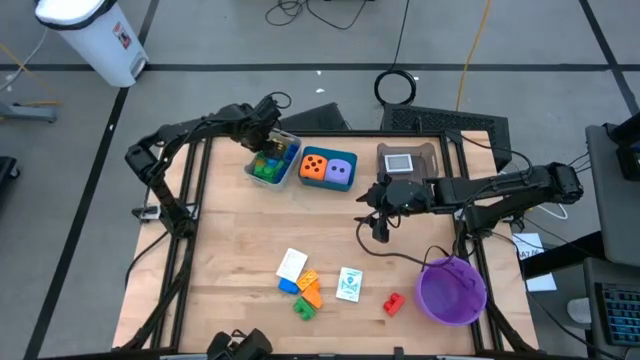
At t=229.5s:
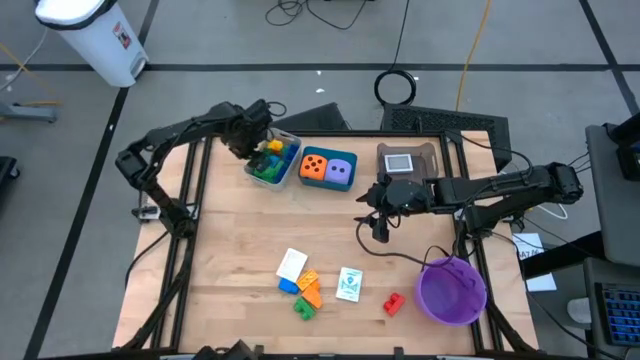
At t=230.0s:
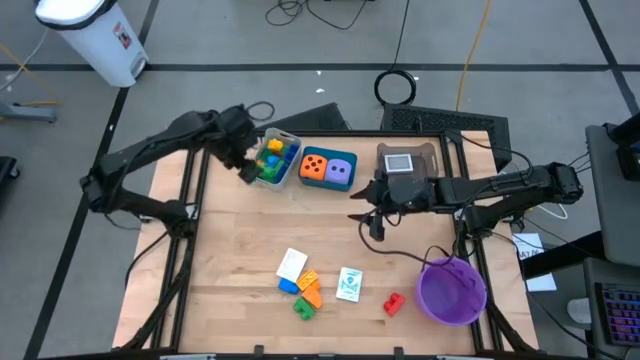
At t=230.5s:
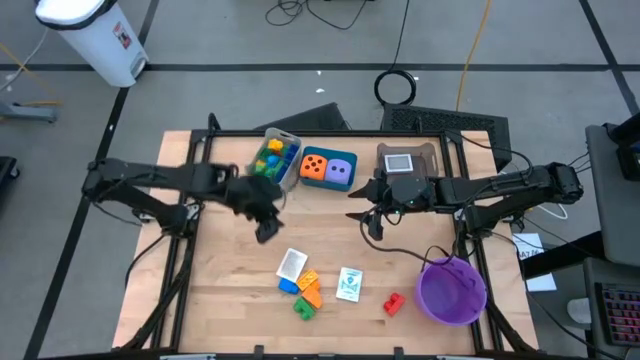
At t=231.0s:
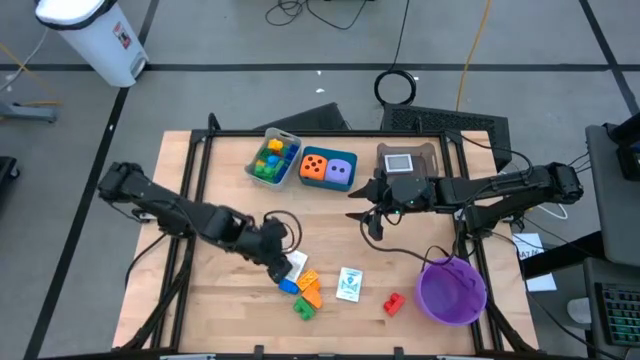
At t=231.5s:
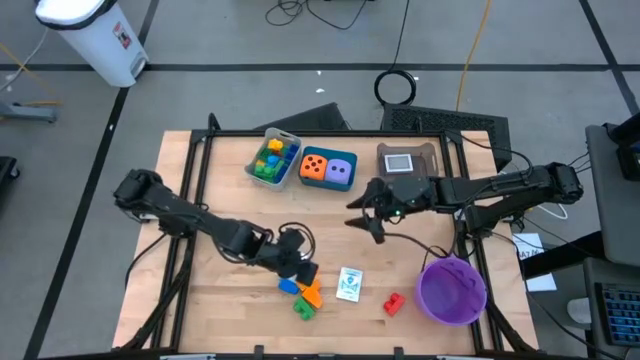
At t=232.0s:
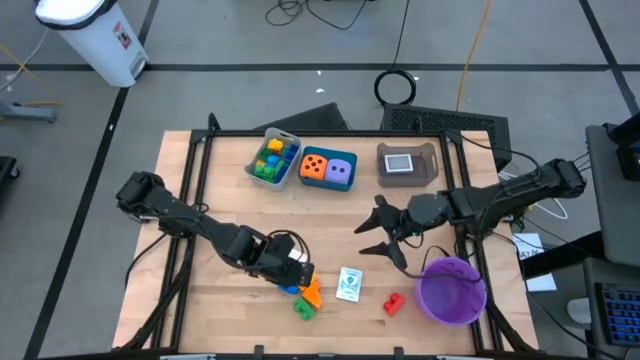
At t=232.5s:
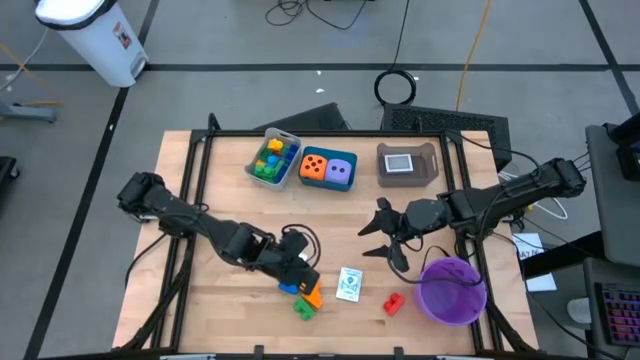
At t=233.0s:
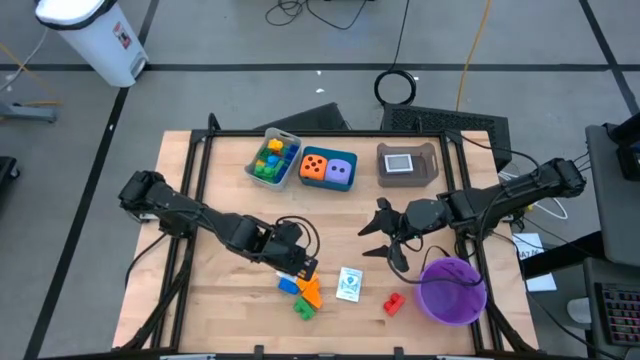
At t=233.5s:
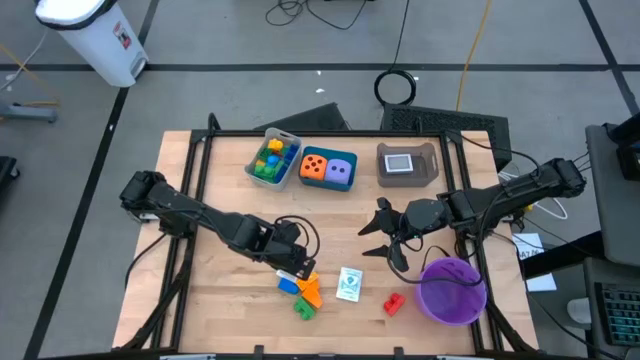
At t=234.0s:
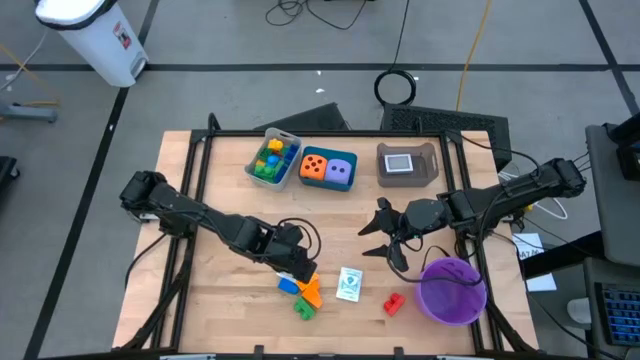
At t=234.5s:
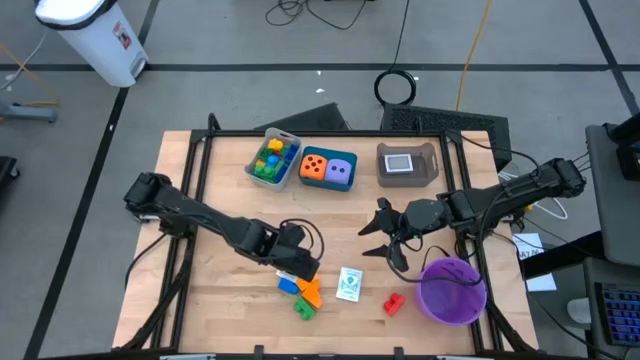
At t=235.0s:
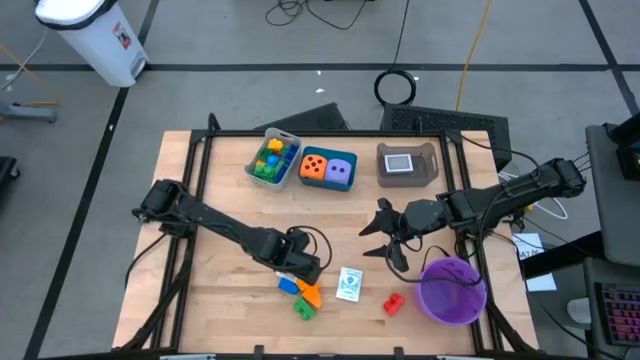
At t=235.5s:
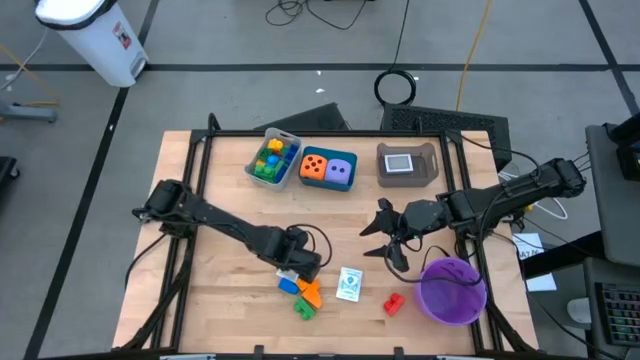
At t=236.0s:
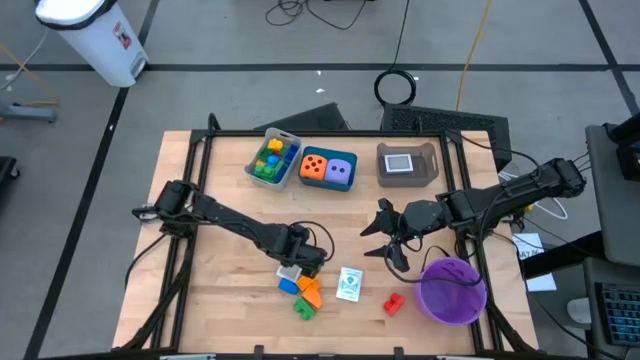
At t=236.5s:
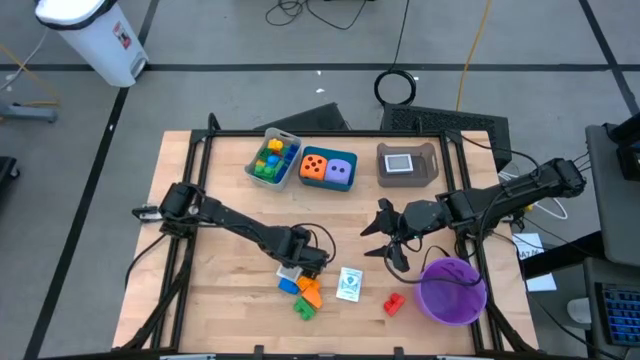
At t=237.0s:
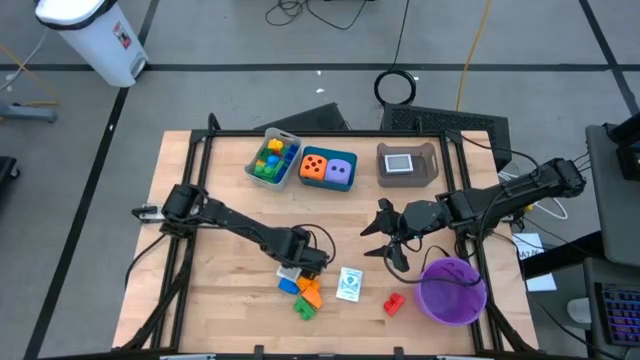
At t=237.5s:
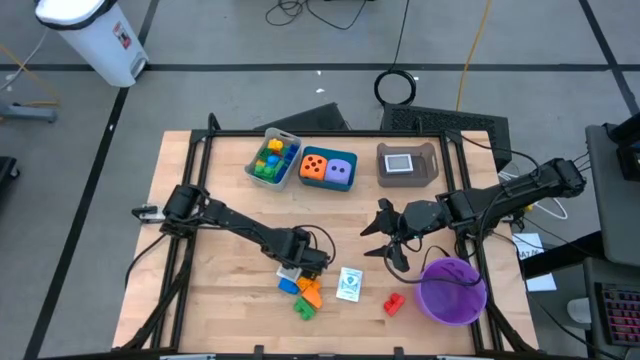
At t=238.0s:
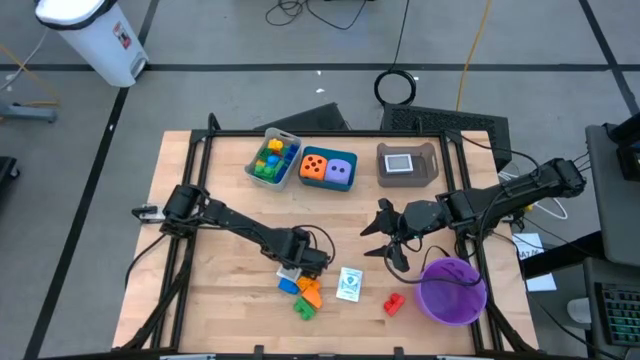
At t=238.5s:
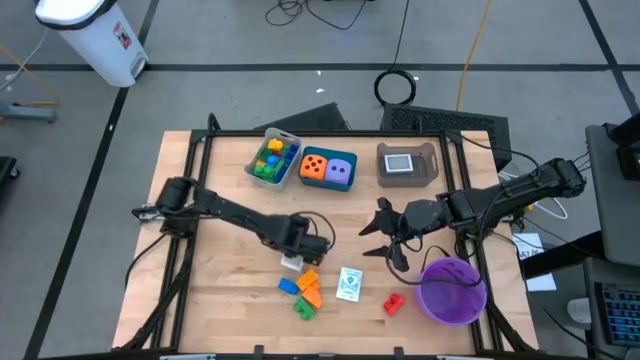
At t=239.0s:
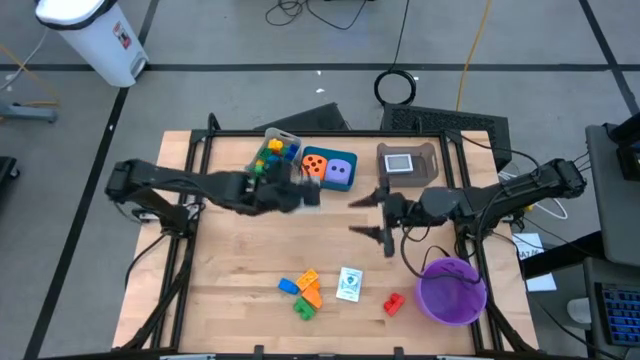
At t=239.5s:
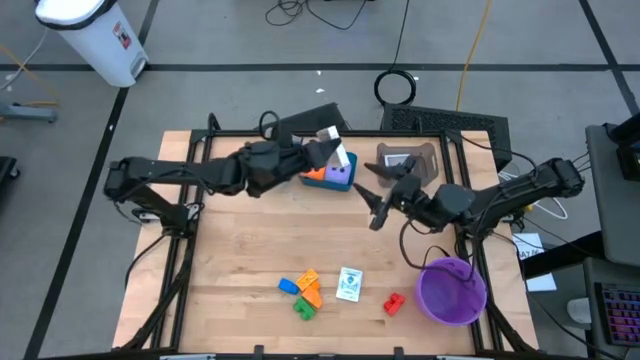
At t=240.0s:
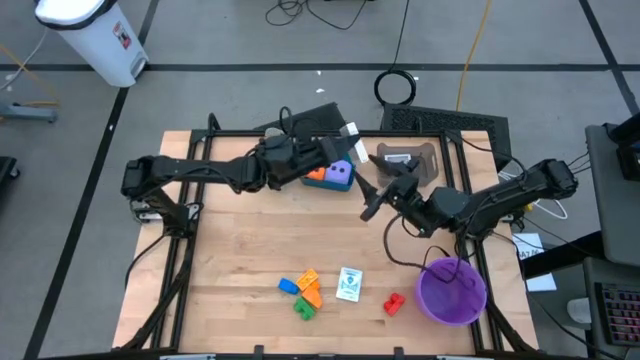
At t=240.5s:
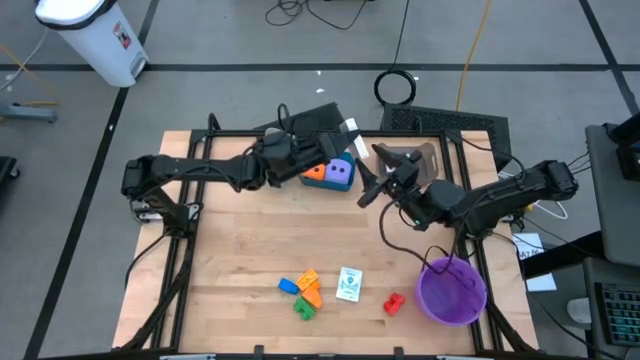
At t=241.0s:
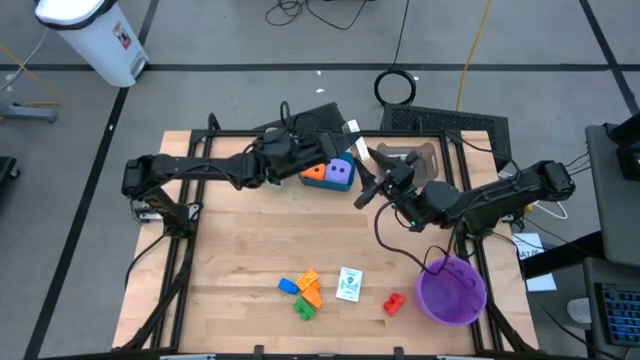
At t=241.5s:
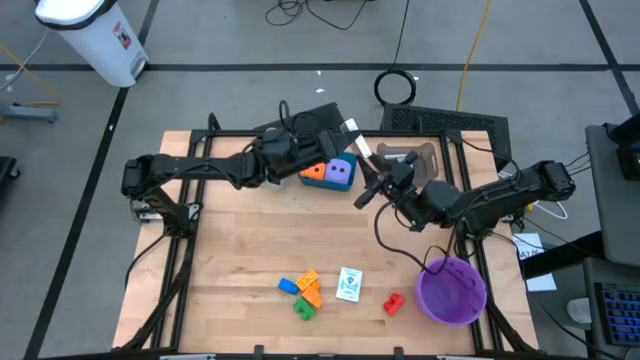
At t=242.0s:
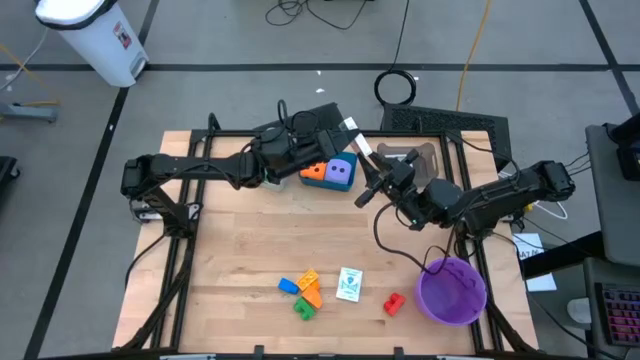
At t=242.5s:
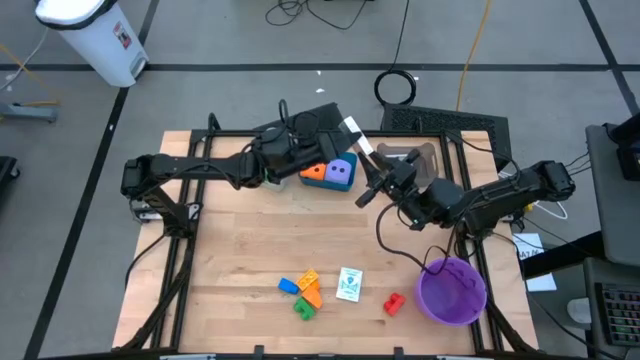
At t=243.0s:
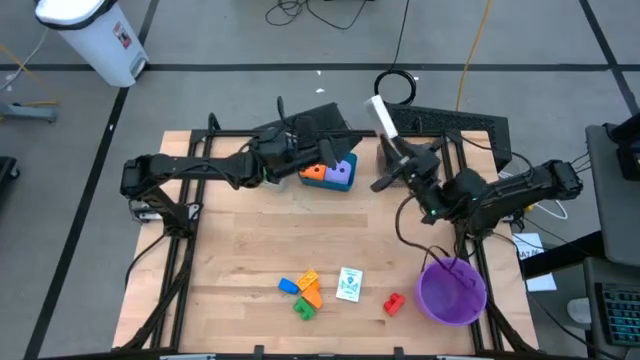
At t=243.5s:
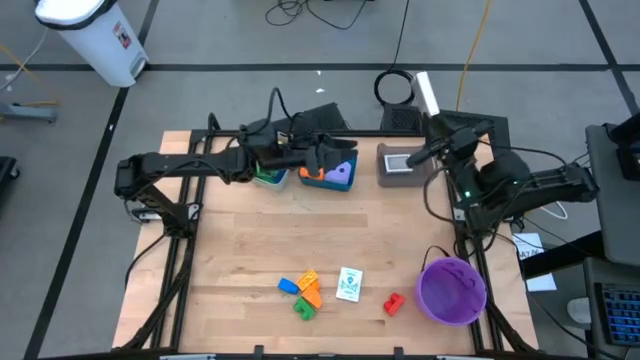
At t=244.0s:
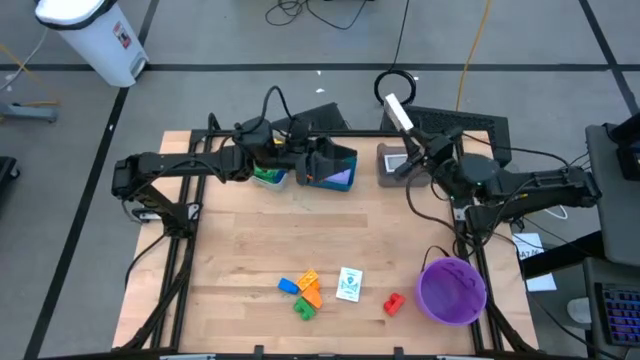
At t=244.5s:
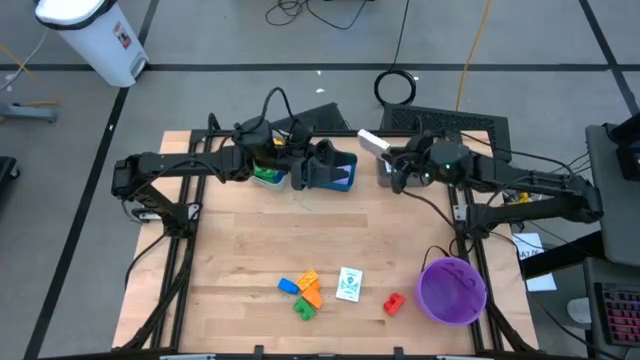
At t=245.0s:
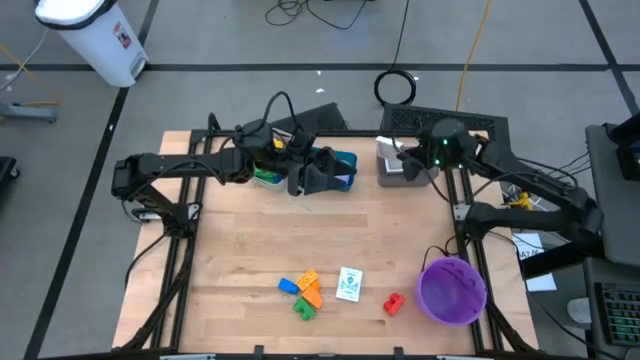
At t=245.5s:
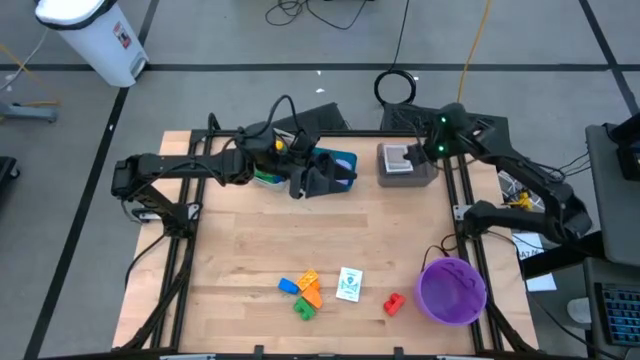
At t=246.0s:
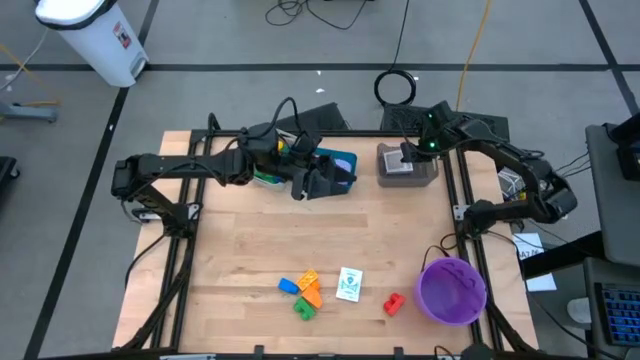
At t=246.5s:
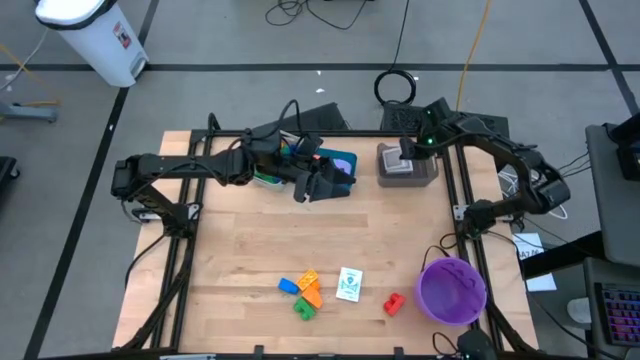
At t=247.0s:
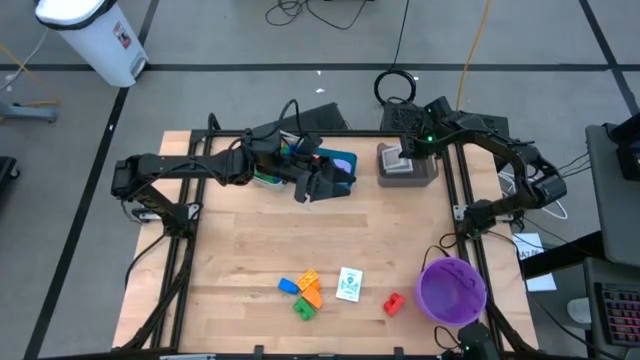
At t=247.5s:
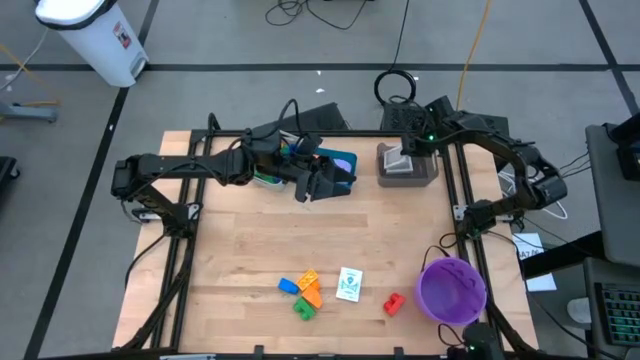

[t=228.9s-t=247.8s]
Task: Pick & Place Toys
Put the brown deck of cards into the black bin

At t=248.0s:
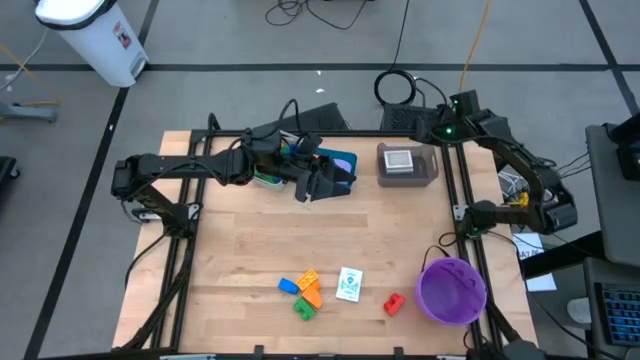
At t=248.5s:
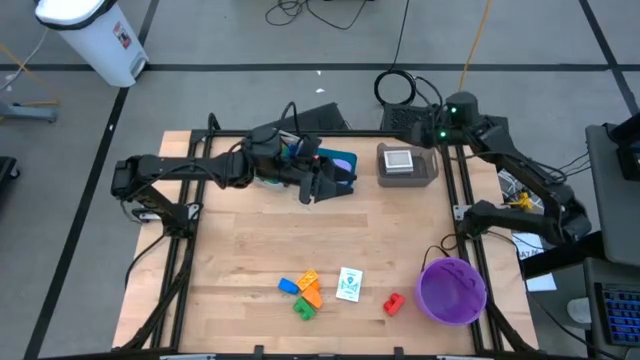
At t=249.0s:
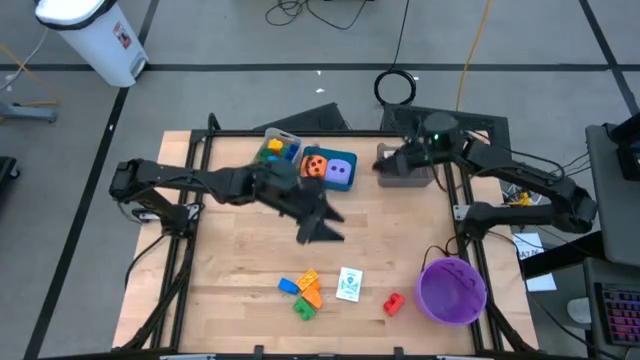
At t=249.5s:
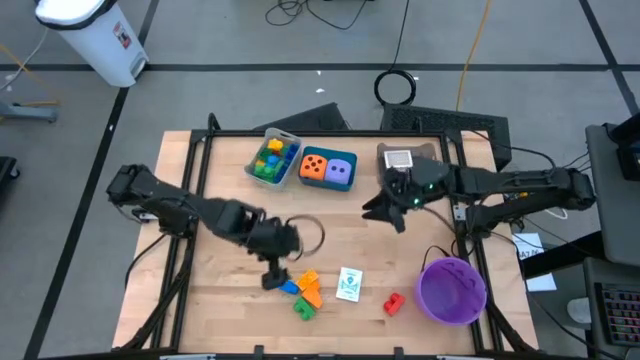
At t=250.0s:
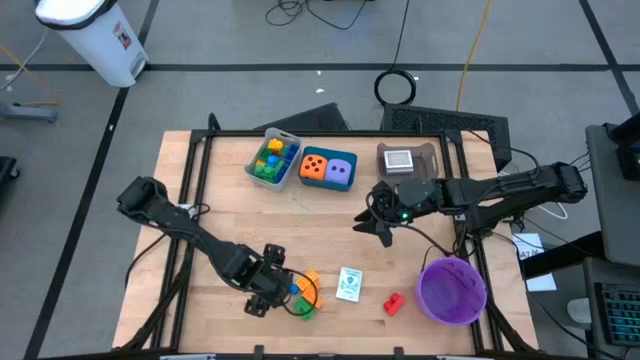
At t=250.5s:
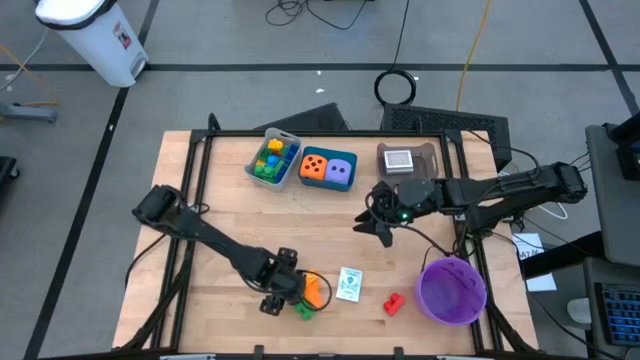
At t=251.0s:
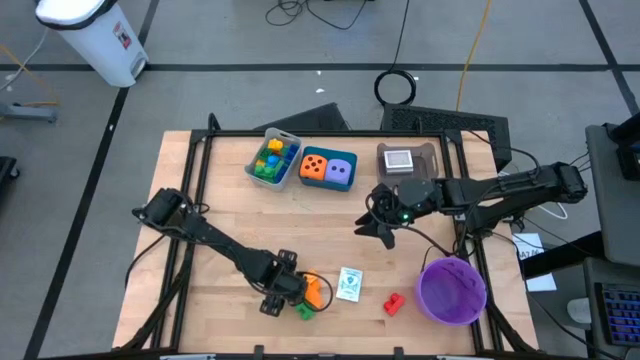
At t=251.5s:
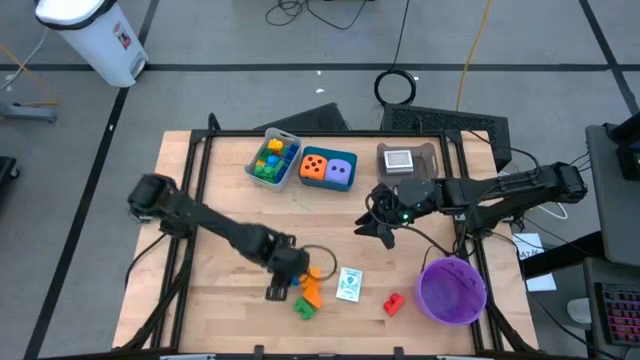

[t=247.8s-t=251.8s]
Put the blue game piece into the gray bin
